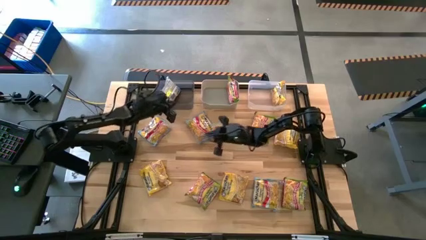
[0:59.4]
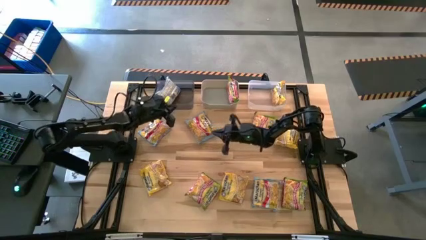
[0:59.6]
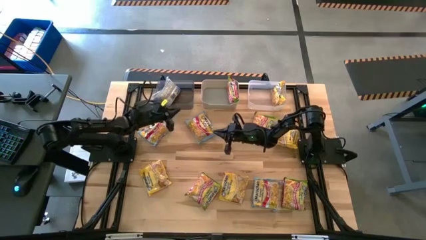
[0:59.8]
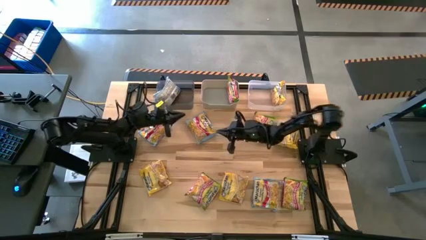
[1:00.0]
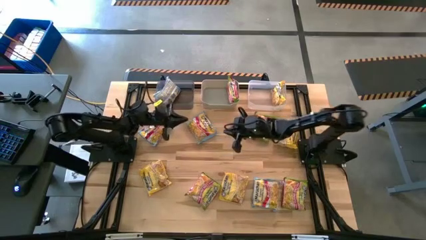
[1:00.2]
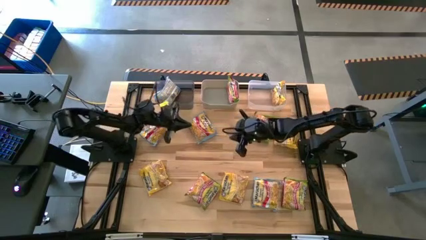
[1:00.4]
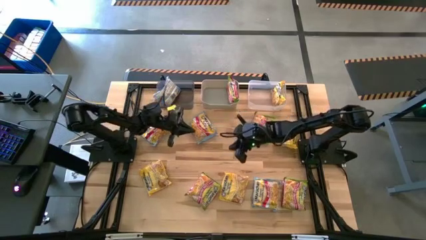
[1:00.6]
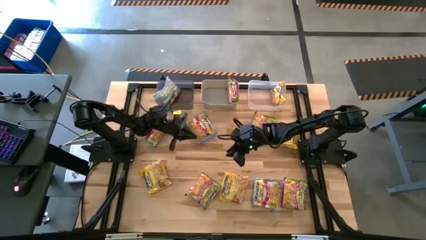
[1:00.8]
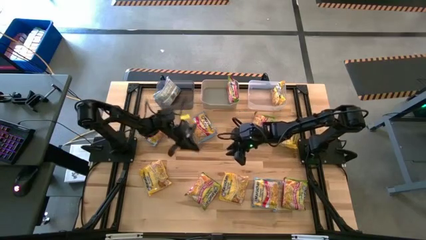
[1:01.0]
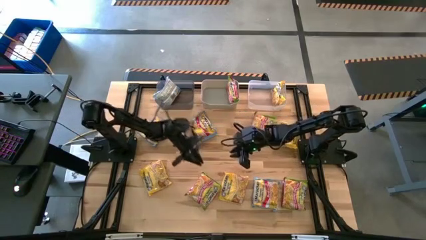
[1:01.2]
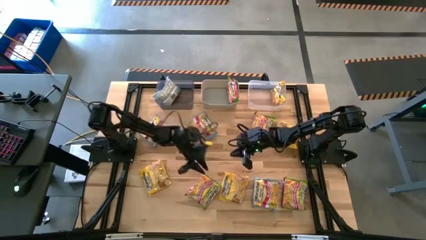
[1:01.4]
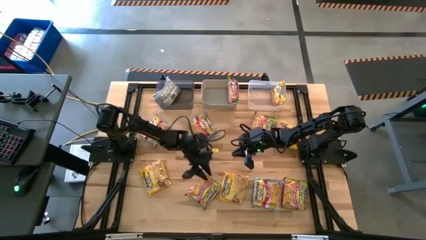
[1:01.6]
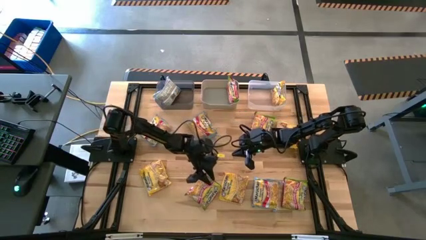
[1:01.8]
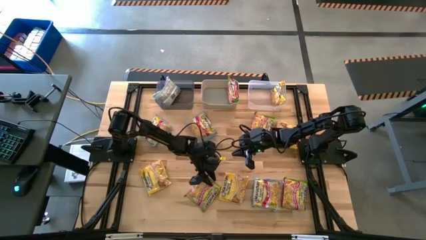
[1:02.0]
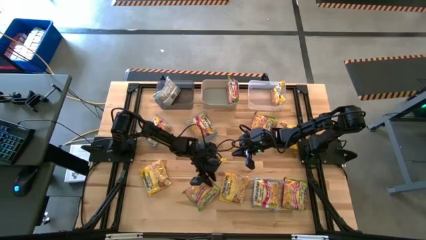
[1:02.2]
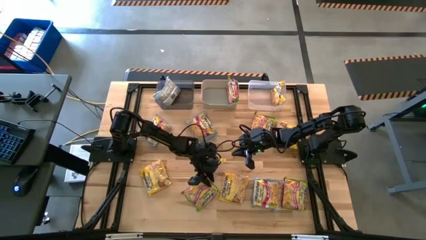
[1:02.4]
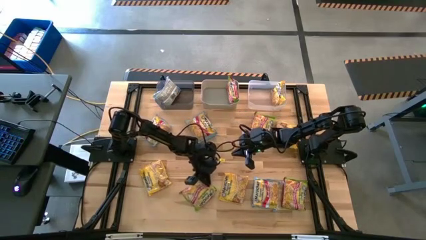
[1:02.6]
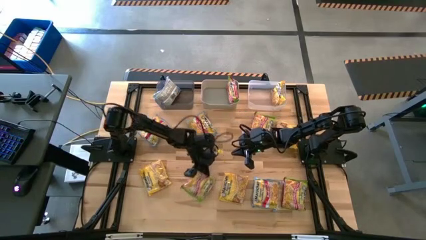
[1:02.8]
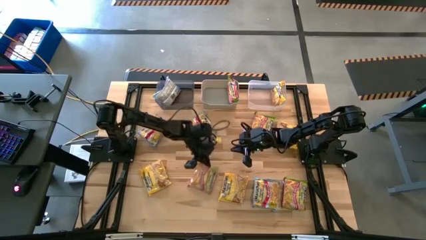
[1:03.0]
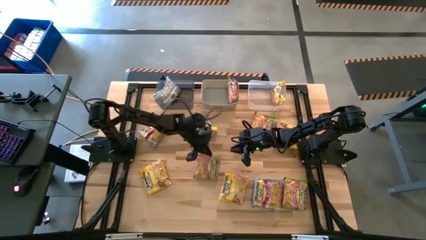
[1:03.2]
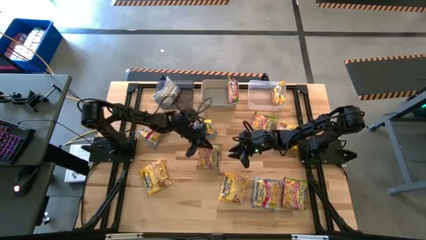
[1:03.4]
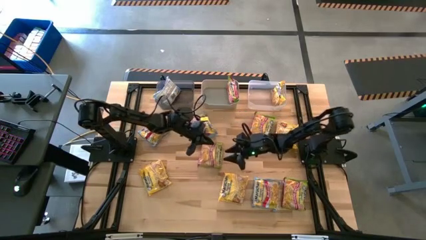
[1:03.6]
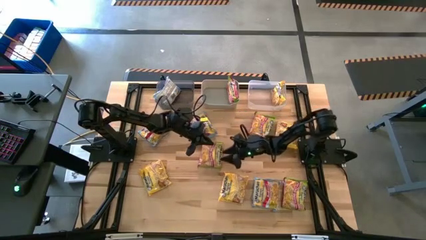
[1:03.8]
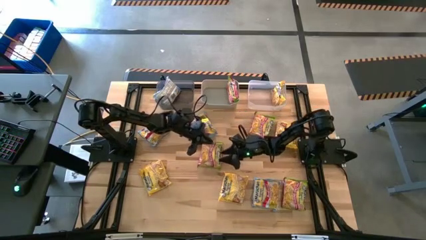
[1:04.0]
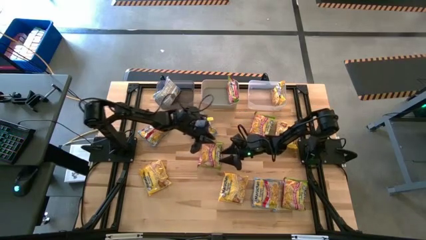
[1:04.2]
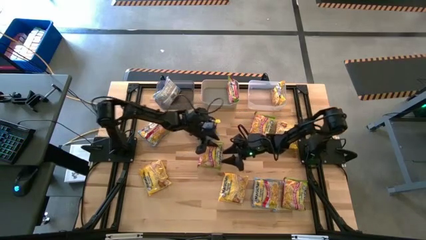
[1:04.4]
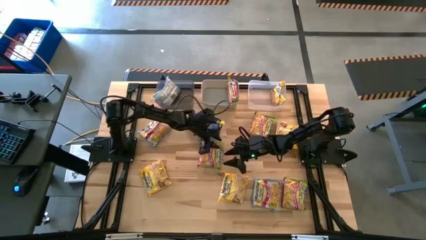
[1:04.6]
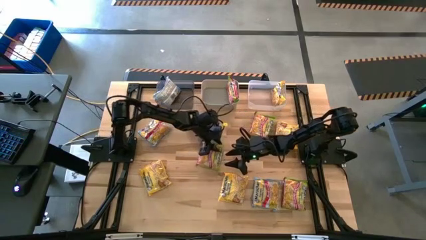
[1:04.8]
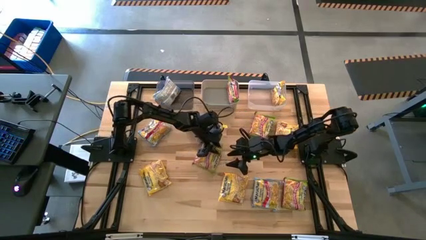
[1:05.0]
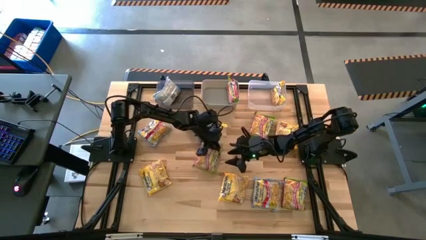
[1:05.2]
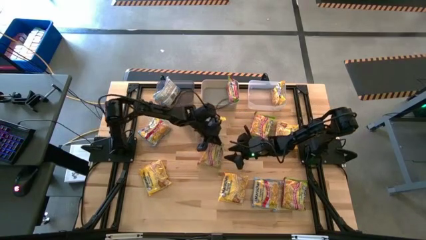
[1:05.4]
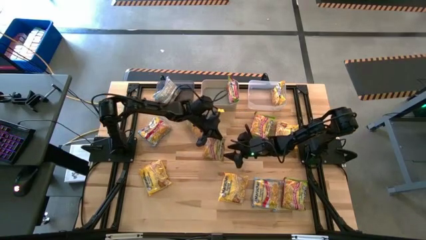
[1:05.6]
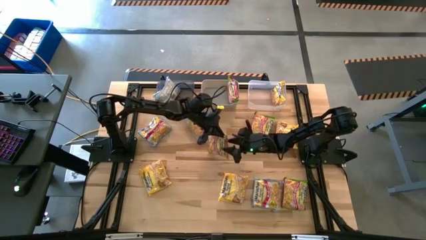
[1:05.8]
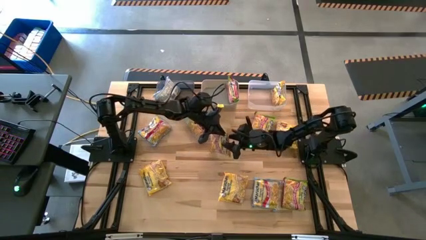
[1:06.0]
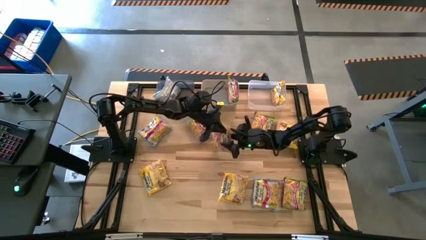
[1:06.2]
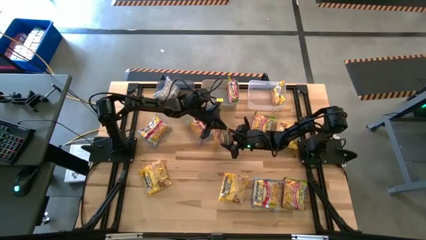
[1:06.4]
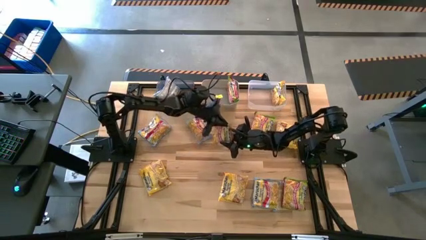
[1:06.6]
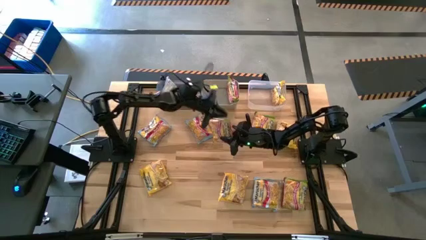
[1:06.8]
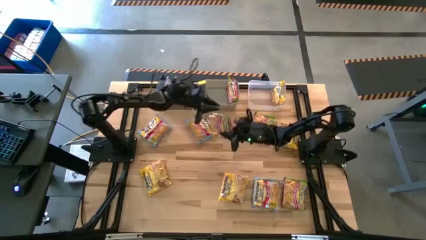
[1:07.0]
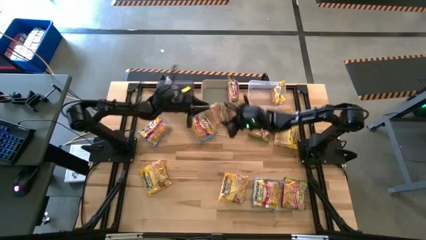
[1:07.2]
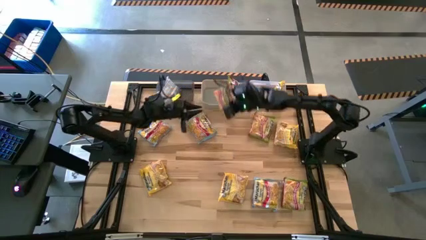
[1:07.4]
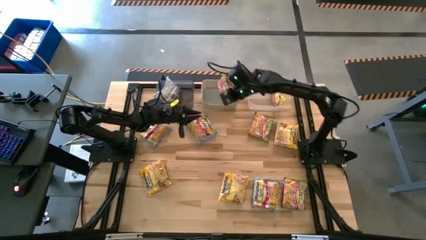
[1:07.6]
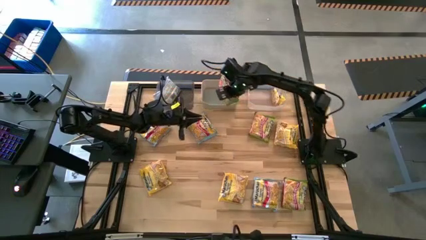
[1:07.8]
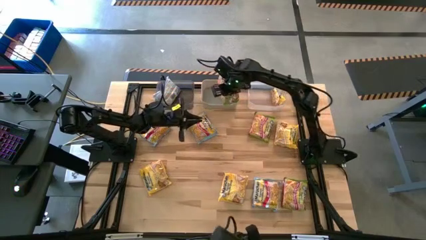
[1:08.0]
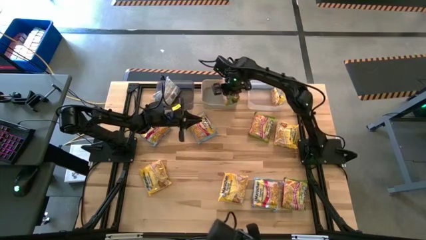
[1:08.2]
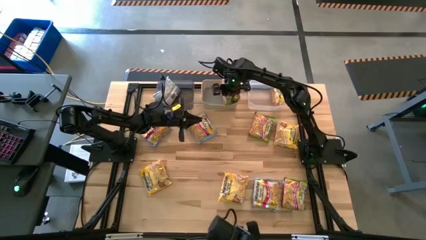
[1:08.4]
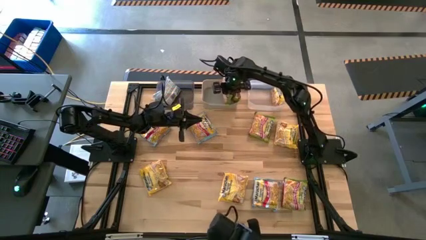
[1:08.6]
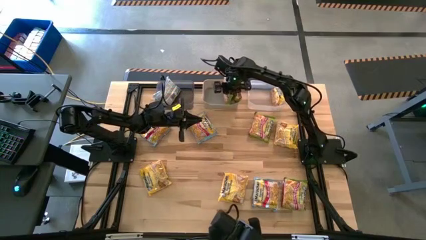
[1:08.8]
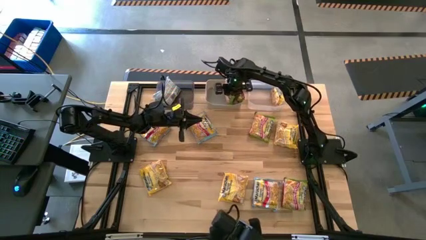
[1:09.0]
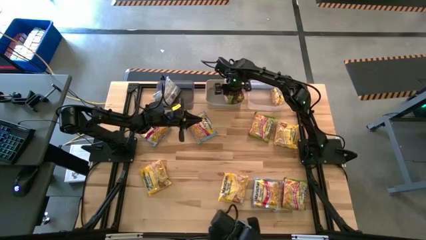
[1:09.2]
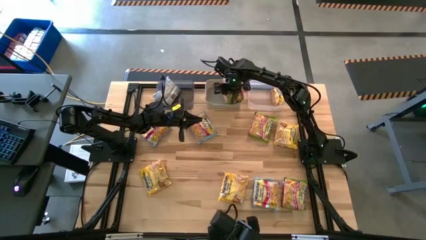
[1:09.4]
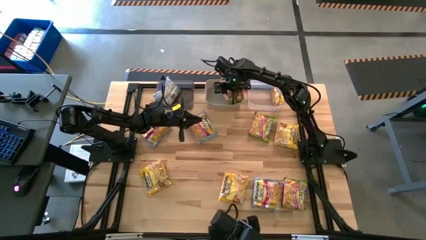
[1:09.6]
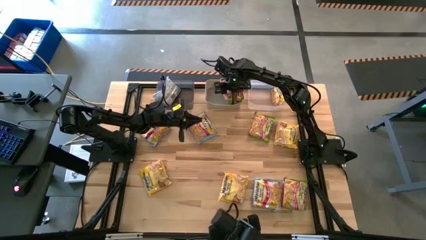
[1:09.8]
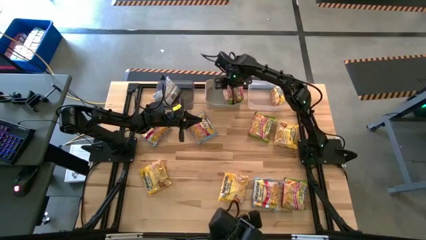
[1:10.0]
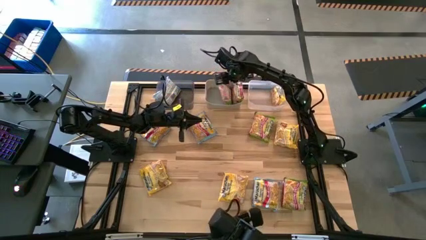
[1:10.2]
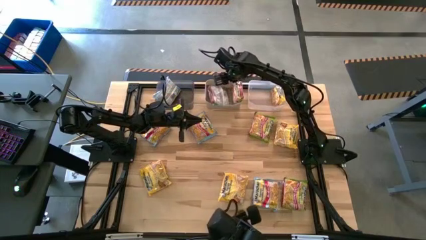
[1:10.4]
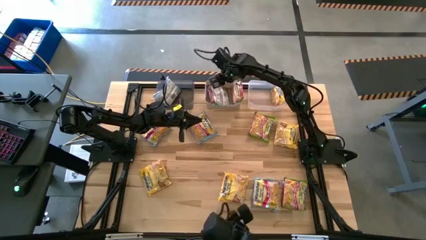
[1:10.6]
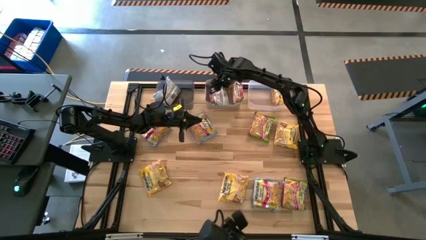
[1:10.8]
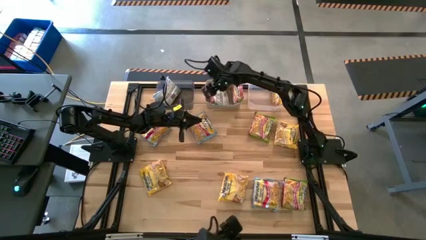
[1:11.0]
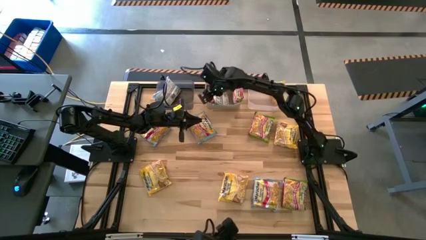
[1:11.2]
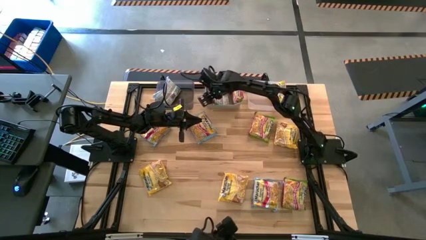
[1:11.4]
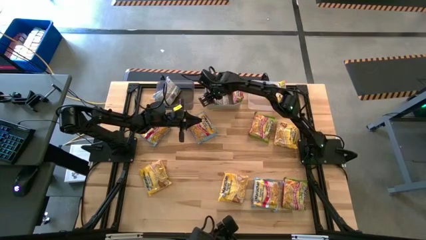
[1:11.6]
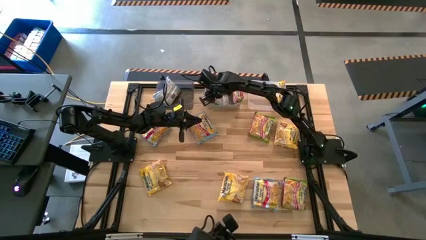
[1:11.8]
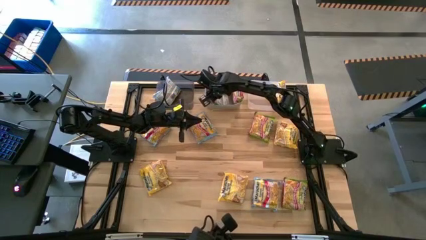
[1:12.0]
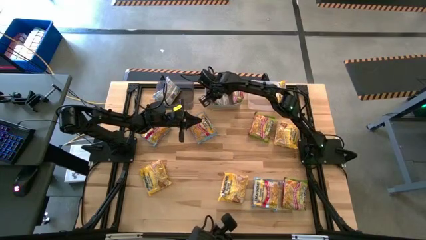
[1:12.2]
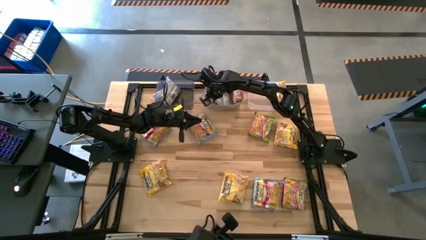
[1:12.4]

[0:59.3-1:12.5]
Task: Sort Maruchan noodles
Put the left green noodle pack into the gray bin

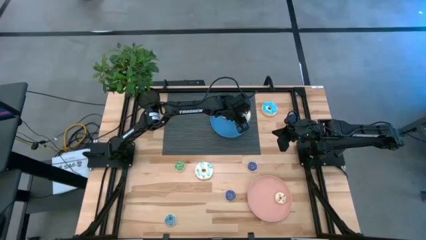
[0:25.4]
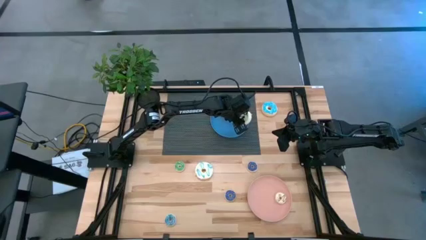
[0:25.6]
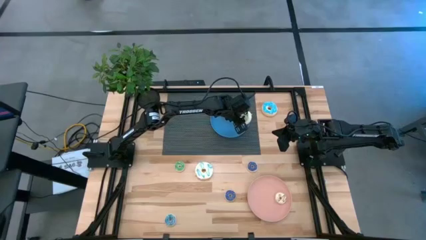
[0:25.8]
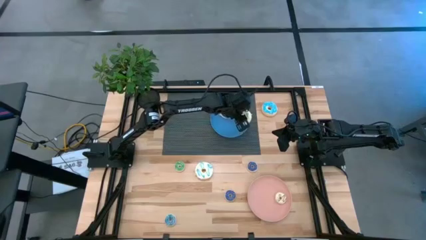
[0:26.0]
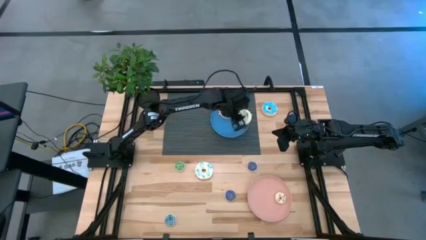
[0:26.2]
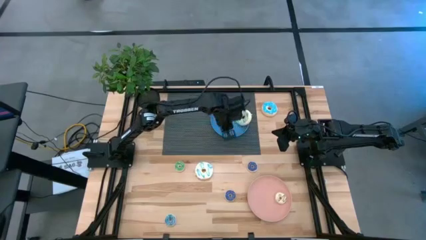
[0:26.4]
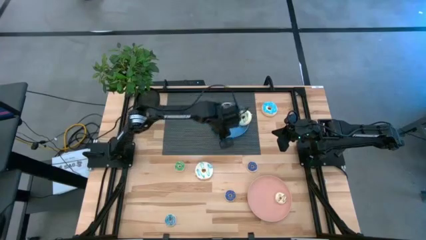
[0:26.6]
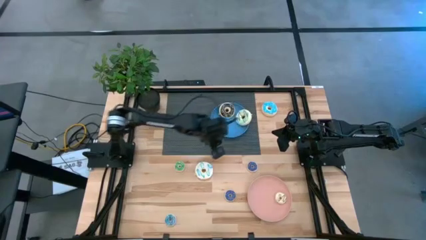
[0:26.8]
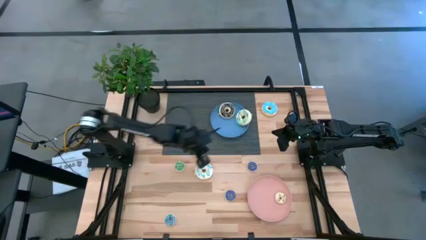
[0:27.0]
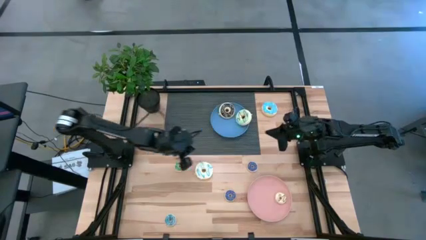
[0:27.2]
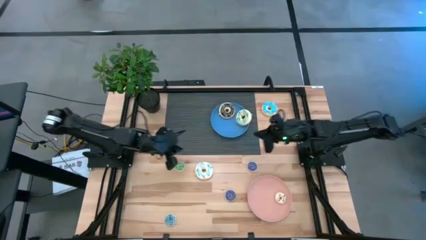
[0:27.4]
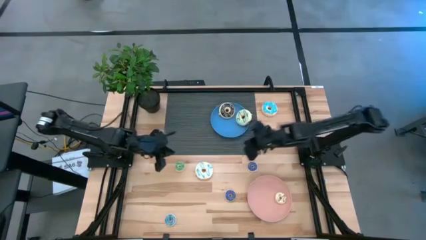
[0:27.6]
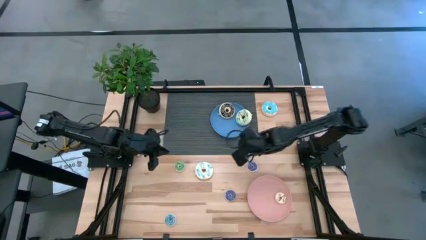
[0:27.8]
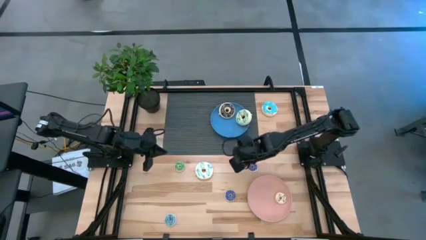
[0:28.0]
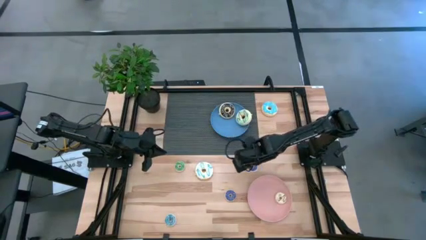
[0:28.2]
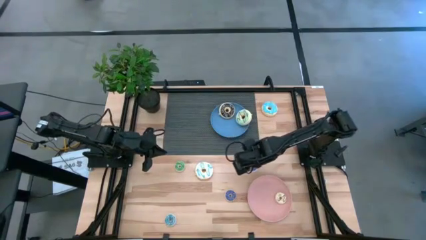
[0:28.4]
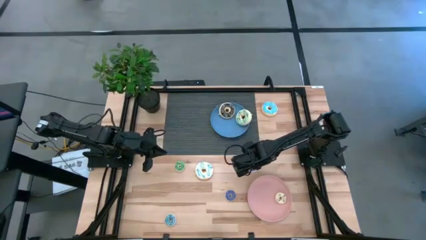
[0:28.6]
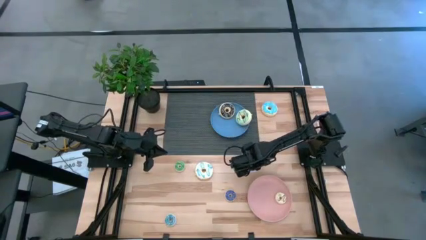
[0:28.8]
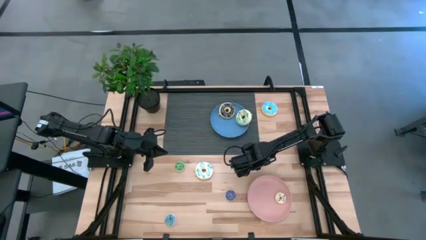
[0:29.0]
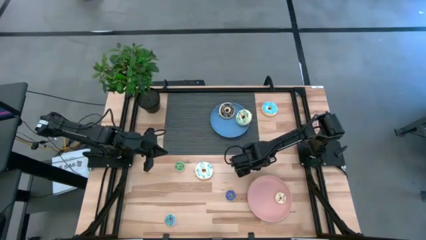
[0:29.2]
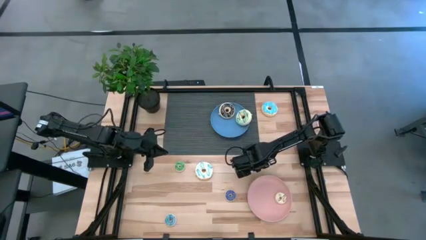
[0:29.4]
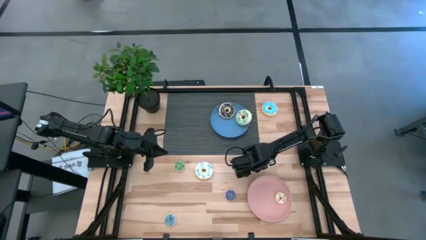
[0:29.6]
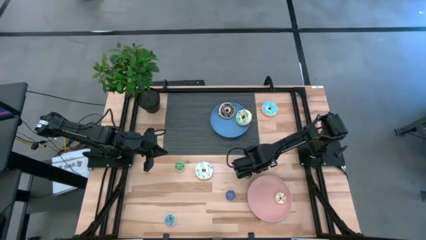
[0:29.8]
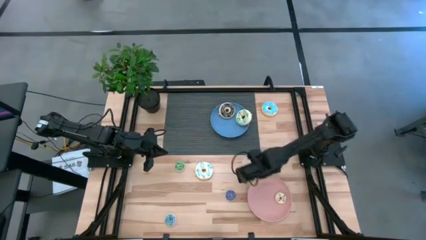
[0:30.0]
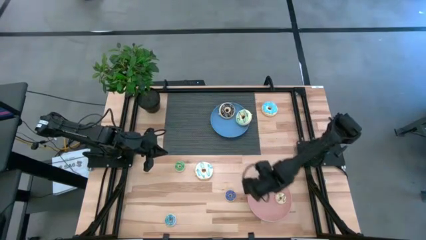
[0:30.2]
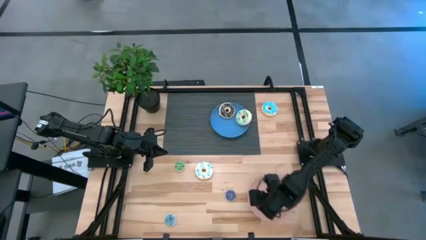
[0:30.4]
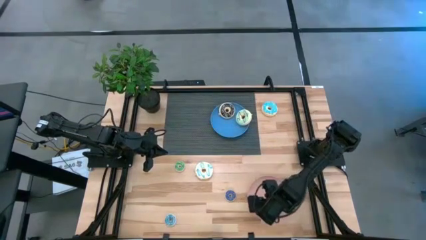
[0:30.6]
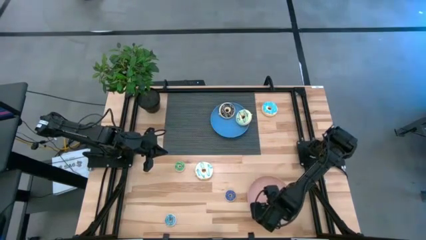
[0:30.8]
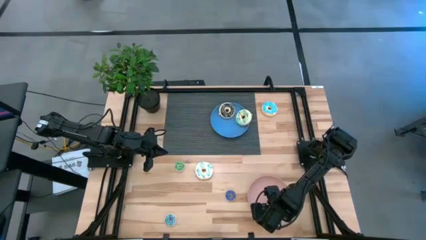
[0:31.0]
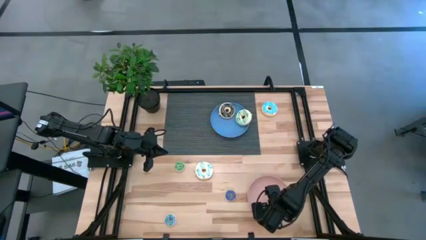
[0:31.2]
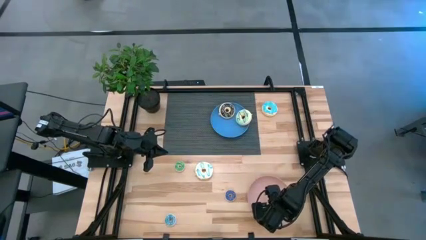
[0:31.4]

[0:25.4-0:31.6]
Task: Pick & Place donuts
Put the top small dark blue donut on the pink plate
